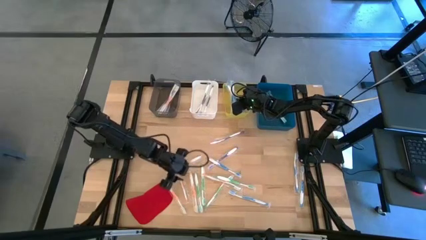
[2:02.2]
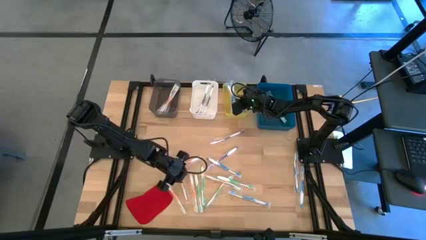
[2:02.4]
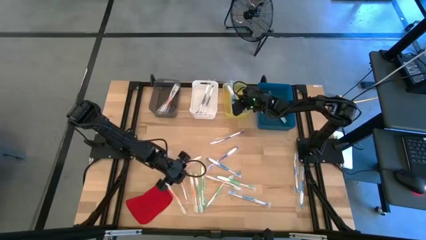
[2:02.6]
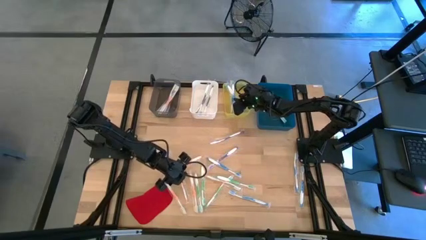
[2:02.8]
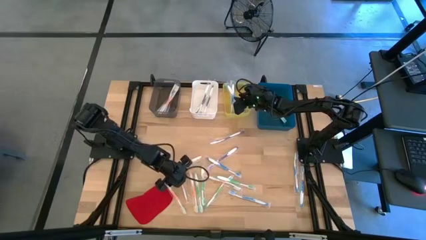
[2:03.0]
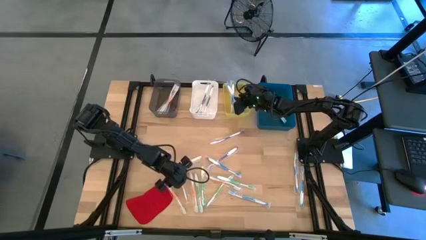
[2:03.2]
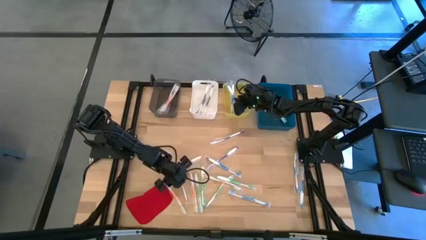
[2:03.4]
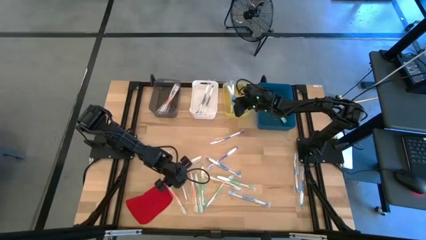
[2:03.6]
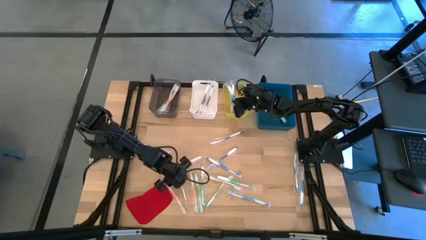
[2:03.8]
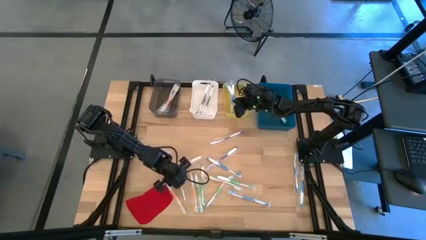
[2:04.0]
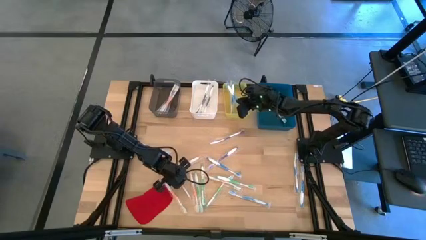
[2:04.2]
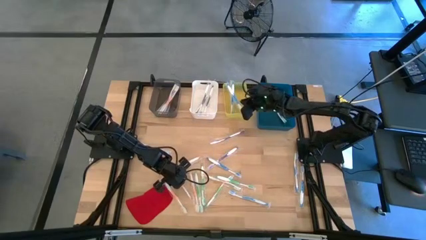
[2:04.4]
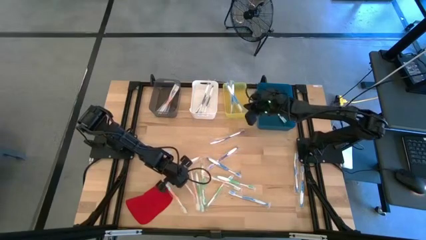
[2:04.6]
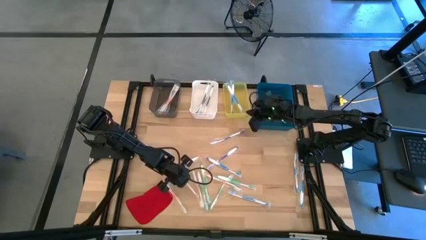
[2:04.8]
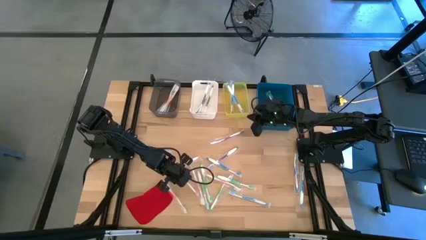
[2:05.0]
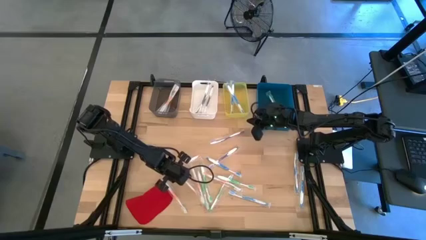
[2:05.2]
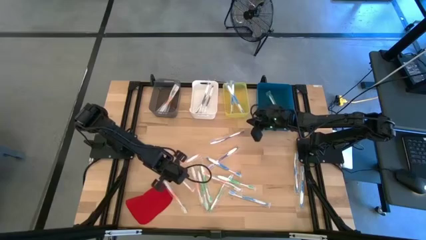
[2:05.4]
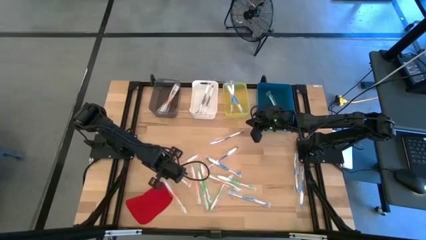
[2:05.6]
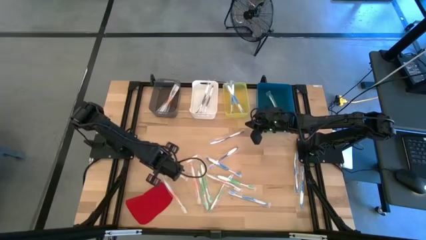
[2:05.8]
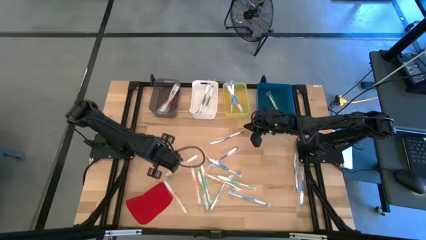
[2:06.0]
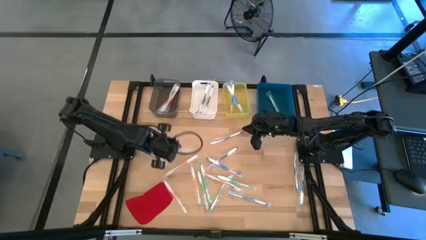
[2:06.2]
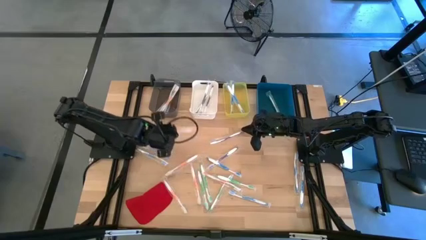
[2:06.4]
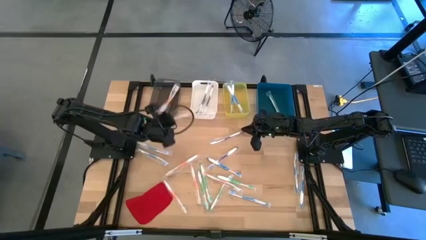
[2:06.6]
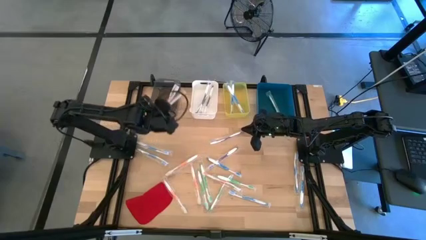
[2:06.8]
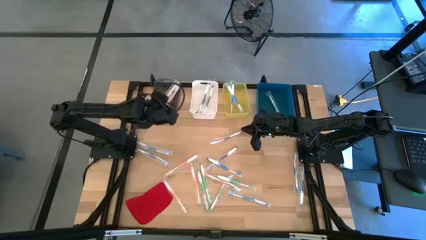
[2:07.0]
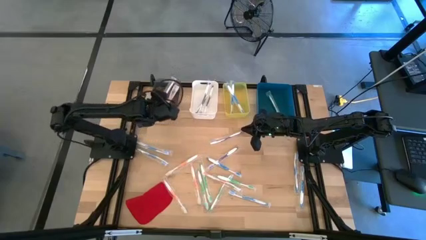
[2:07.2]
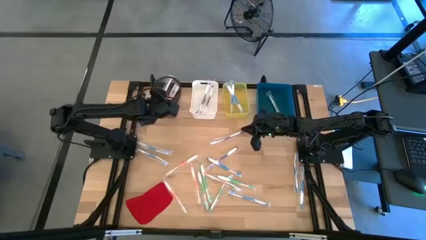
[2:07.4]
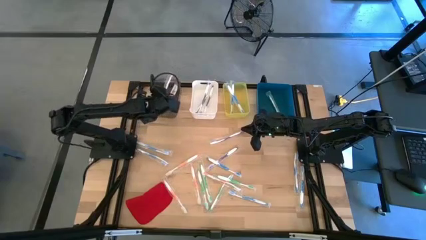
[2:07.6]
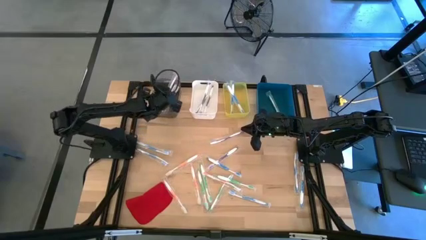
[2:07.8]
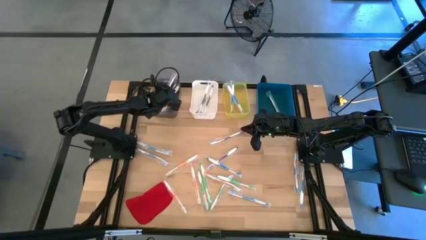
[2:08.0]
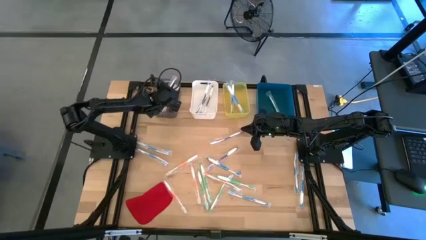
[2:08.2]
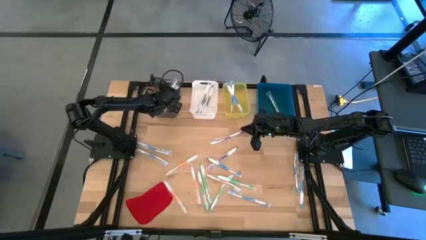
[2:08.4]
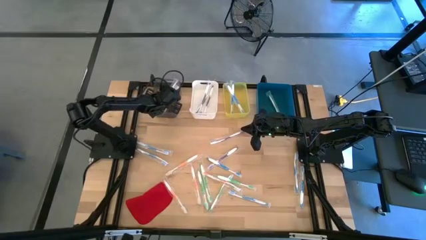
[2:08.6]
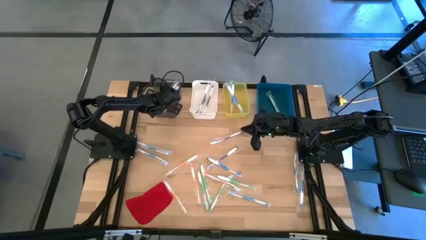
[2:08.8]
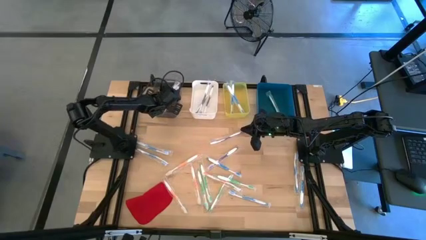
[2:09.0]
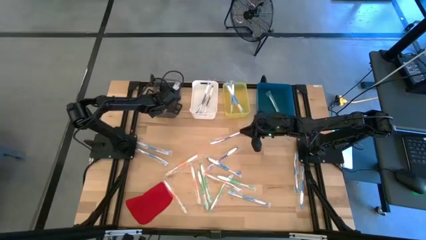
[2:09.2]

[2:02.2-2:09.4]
Task: Pick & Place Toothbrushes
Put the orange toothbrush into the black bin

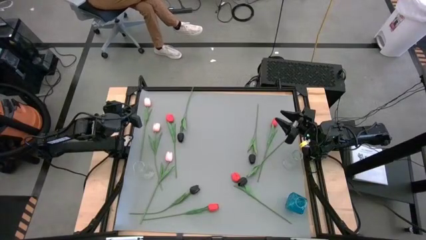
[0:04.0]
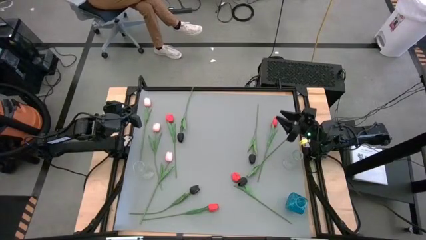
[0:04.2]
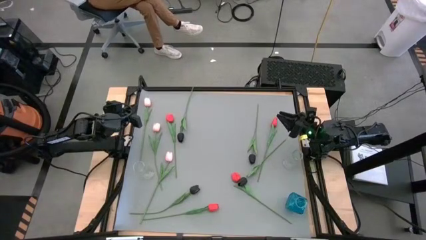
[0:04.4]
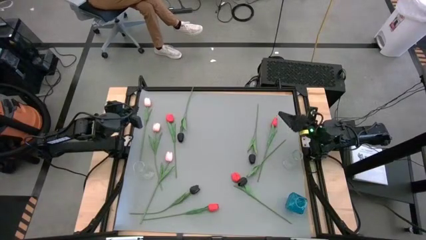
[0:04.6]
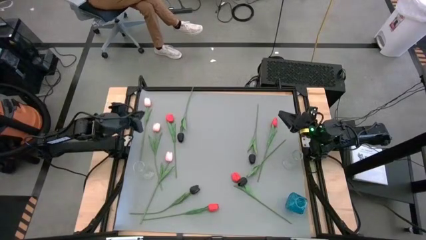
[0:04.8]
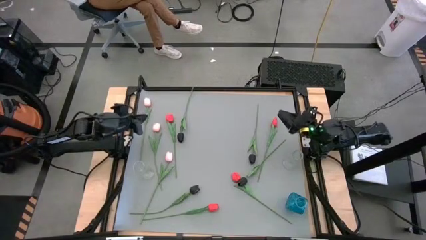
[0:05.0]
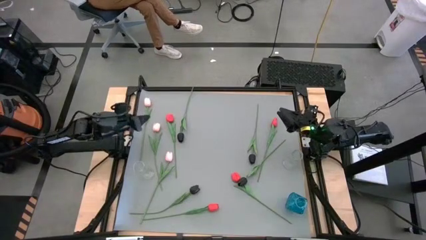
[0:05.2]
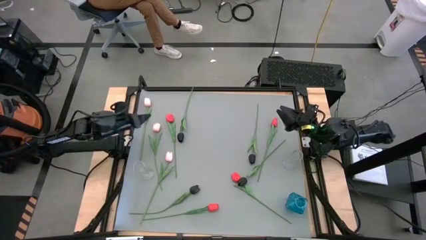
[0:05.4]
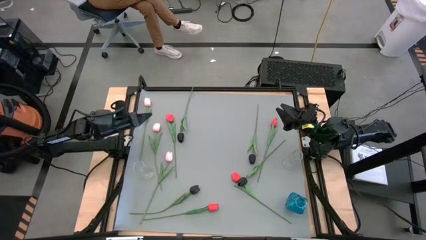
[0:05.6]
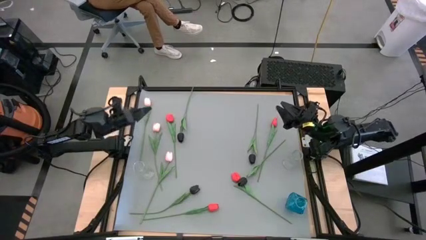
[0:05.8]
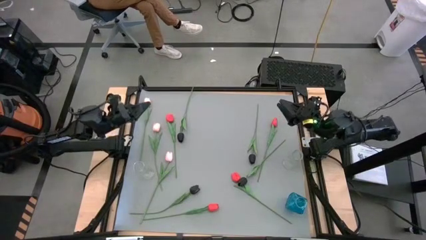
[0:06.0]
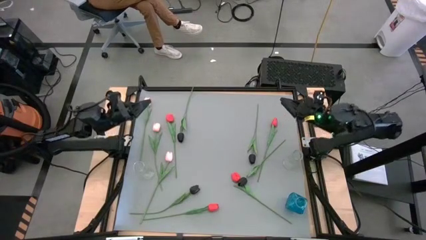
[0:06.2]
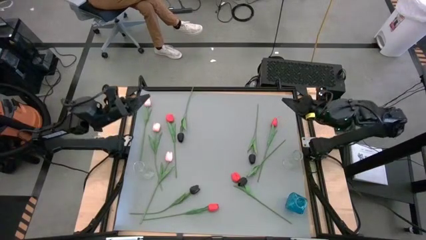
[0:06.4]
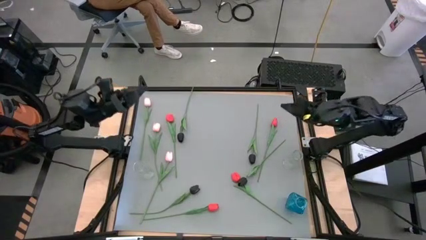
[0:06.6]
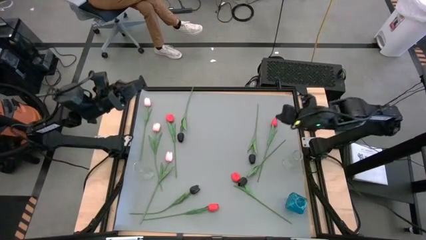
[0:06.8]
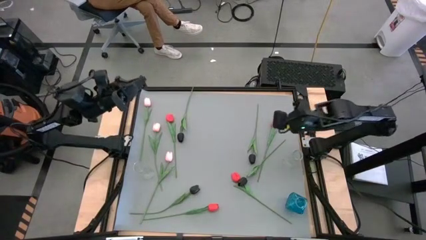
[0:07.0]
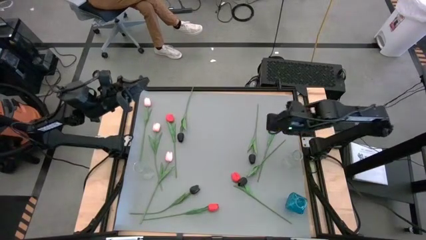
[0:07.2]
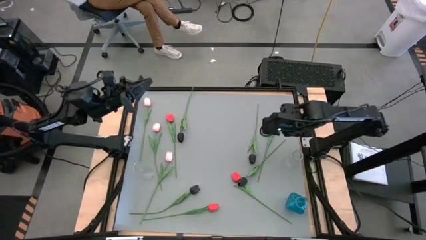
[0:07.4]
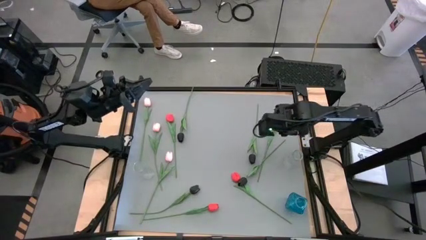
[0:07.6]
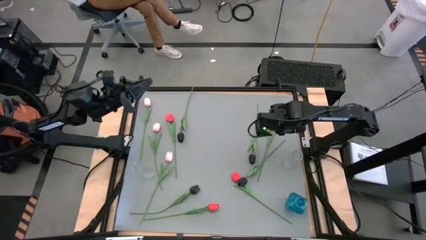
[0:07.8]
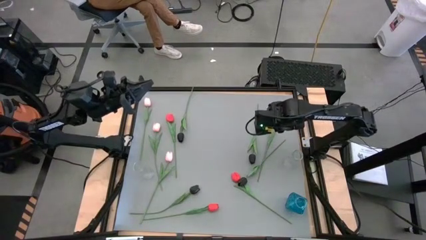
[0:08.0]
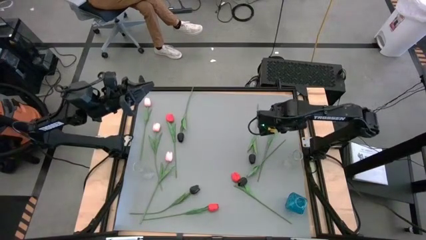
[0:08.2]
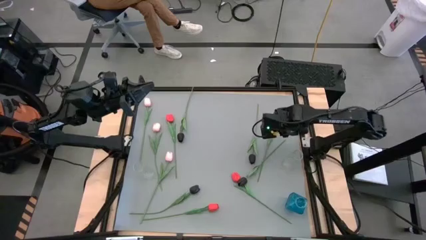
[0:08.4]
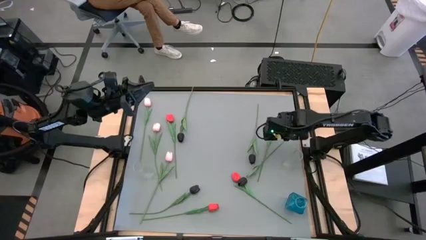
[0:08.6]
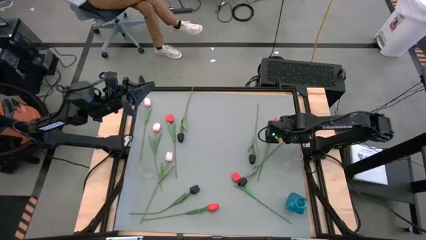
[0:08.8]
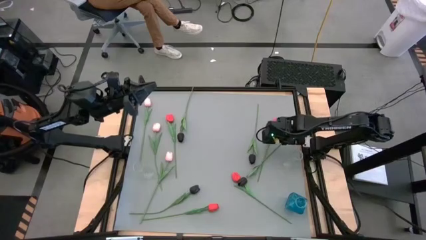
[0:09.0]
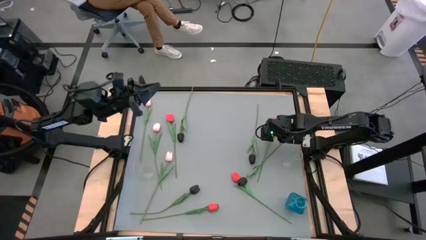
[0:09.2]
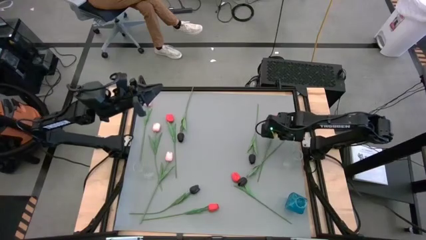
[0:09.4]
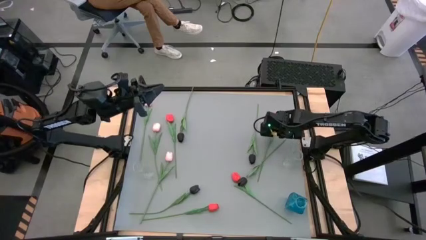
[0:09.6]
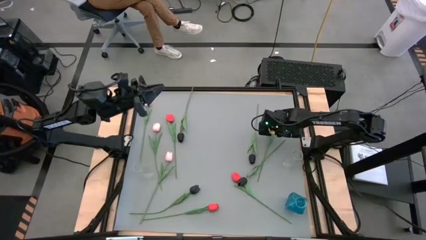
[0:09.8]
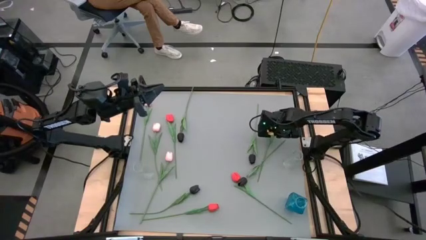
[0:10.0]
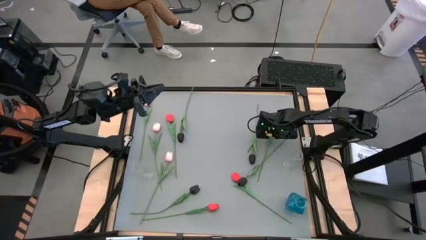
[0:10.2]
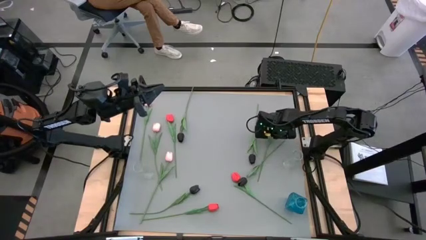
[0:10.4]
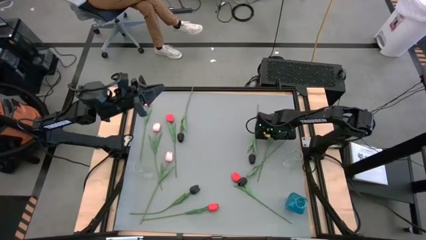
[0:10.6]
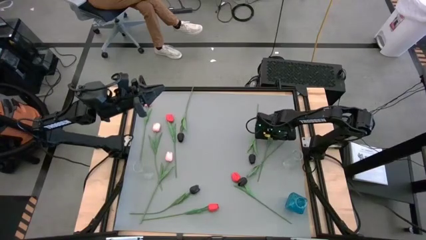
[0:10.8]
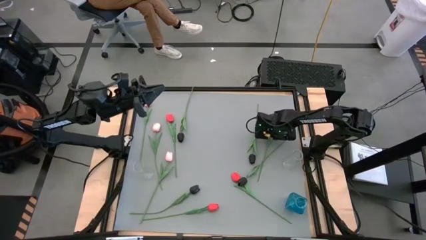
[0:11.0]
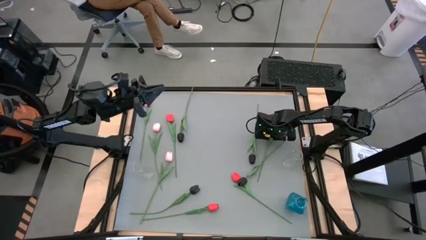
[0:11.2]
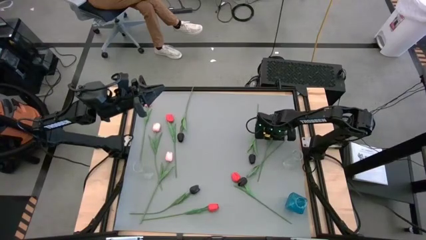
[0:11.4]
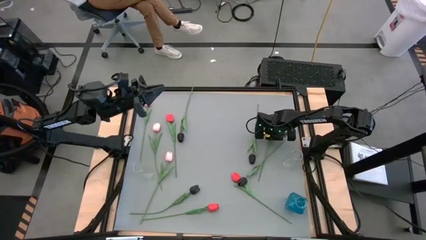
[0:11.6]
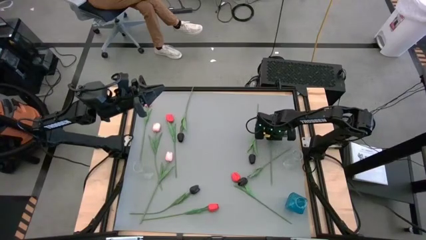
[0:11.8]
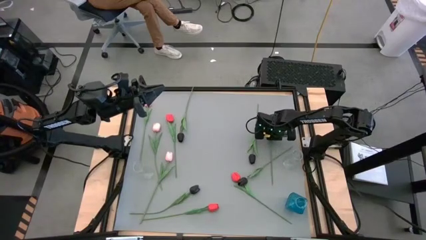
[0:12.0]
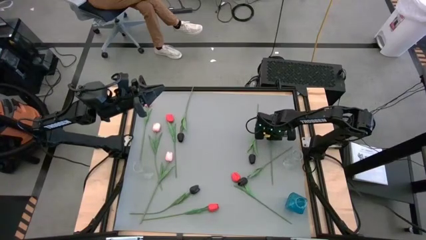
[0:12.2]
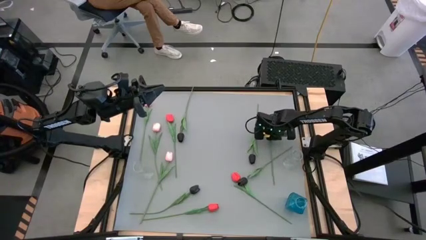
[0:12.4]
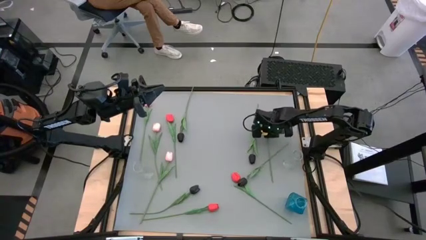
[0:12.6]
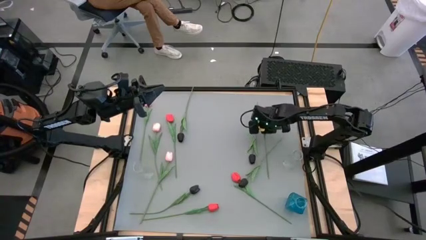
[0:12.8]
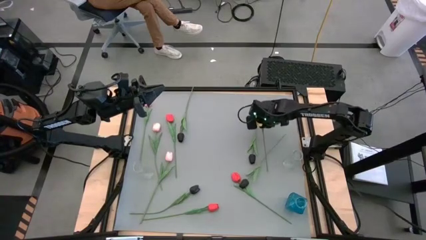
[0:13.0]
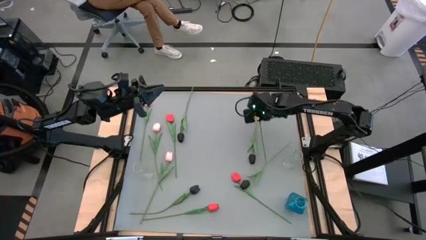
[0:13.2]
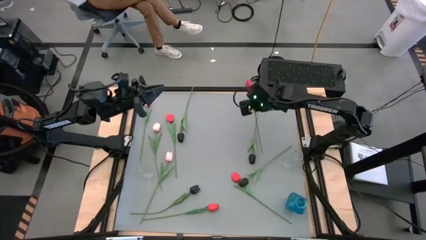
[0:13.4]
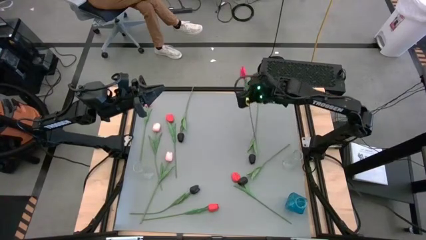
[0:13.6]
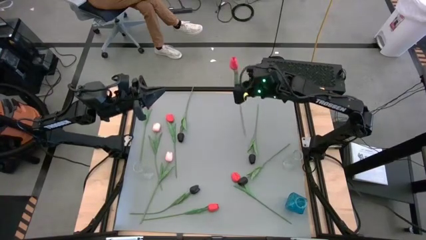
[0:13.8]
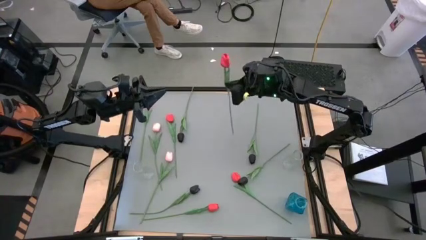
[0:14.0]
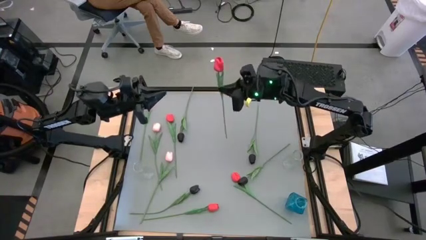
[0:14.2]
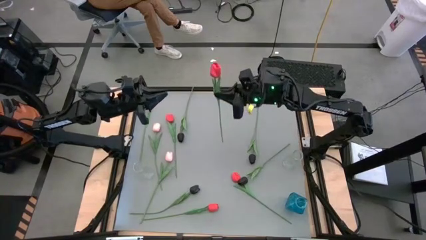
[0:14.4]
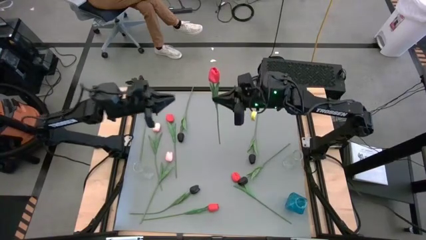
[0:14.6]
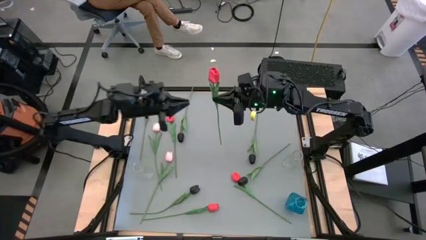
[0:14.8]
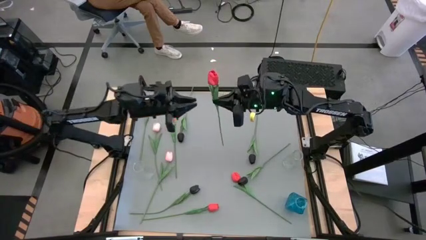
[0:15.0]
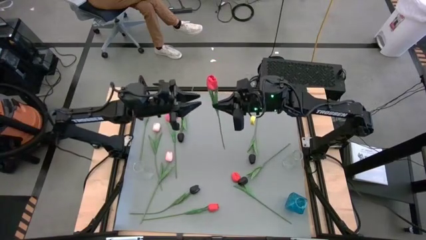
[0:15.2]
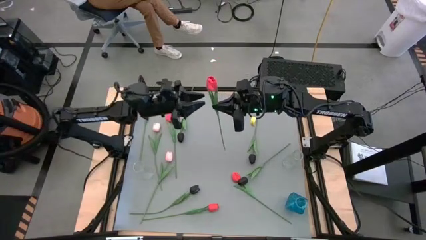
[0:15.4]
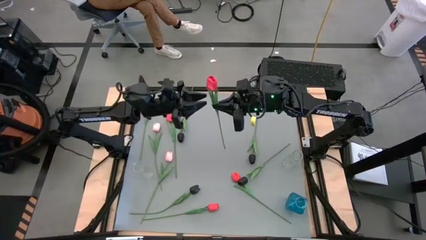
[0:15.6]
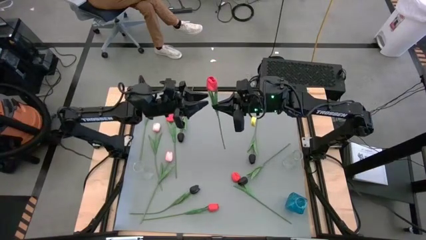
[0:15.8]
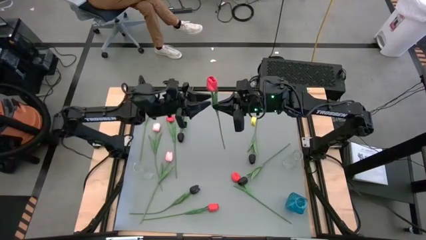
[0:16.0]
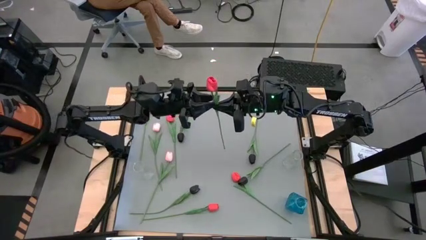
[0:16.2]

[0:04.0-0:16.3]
Task: Sort flowers into vase by color
Put the top right red tulip into the left transparent vase
